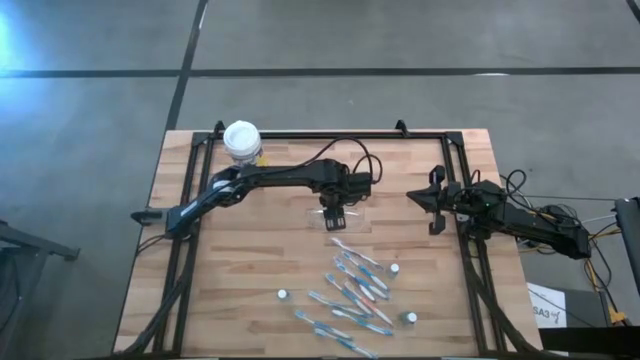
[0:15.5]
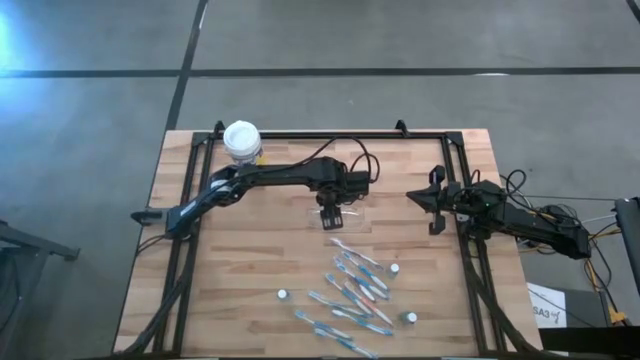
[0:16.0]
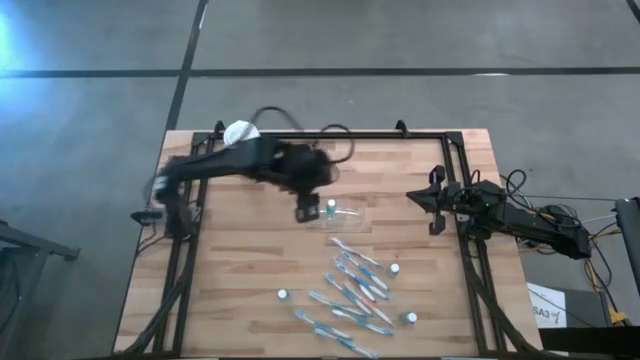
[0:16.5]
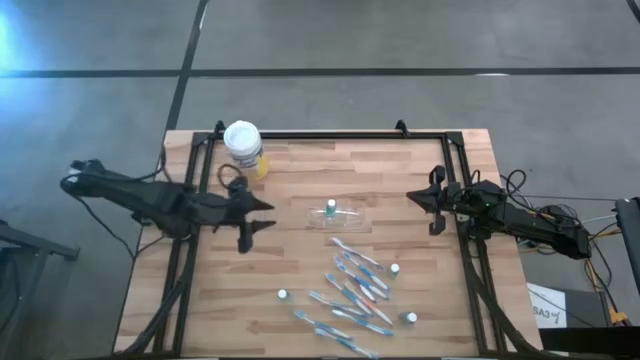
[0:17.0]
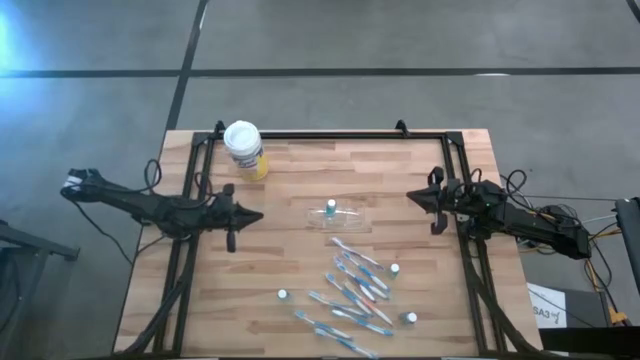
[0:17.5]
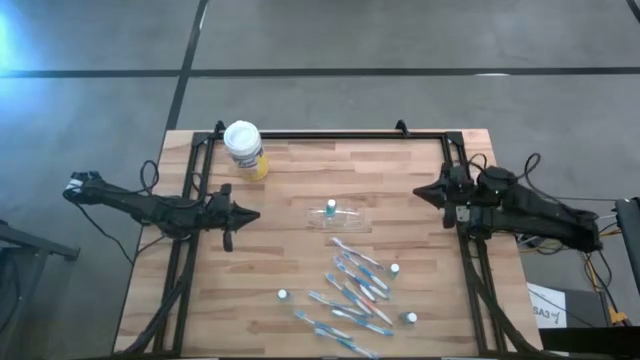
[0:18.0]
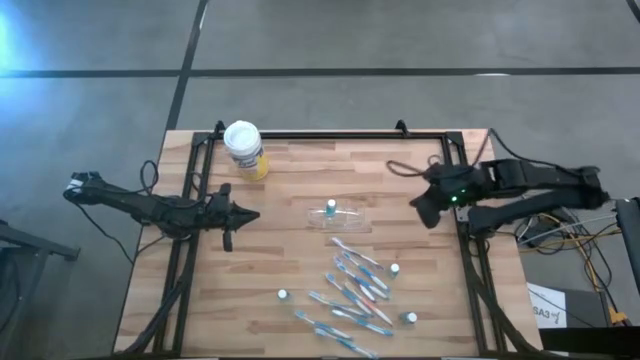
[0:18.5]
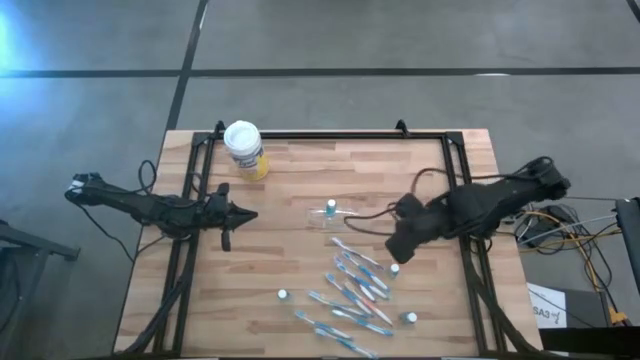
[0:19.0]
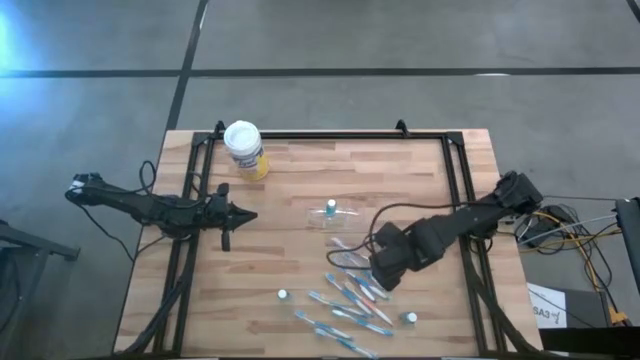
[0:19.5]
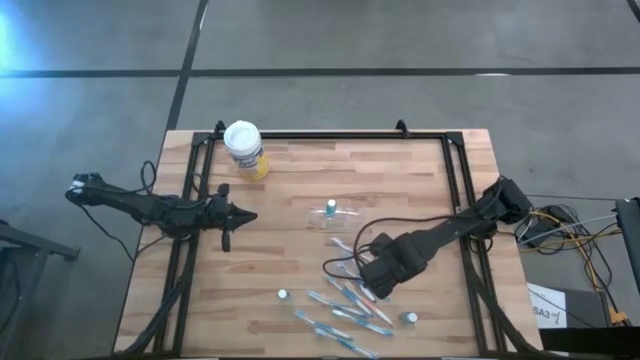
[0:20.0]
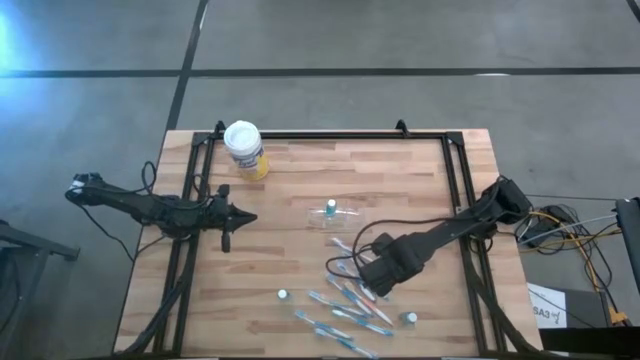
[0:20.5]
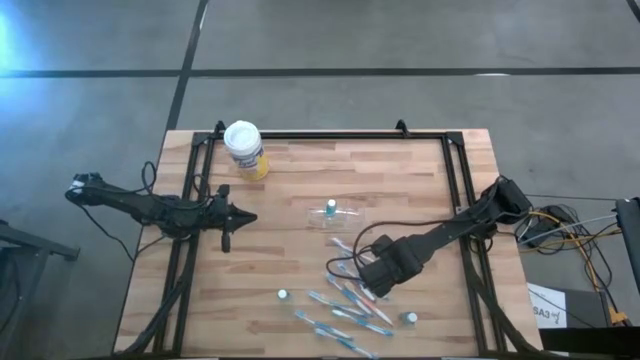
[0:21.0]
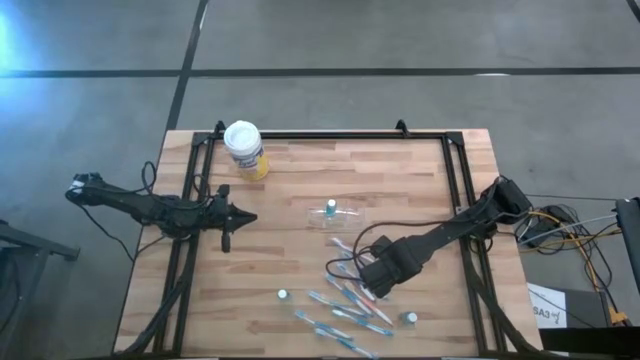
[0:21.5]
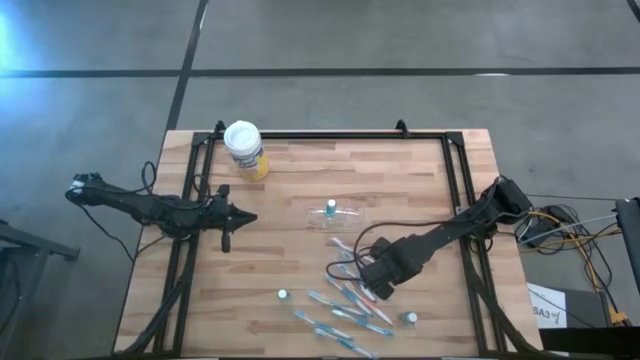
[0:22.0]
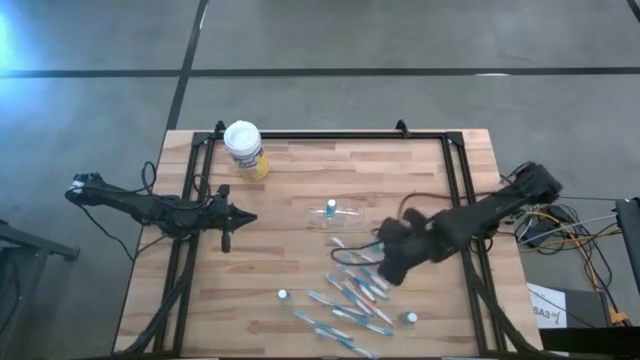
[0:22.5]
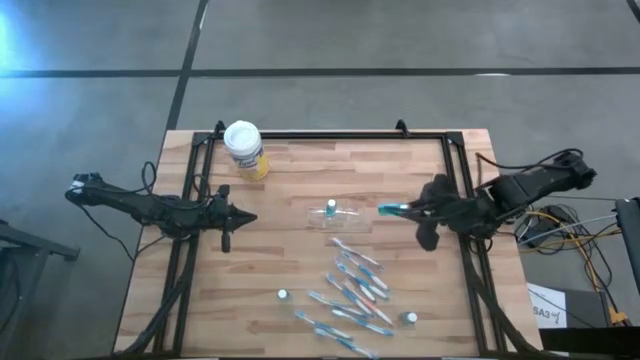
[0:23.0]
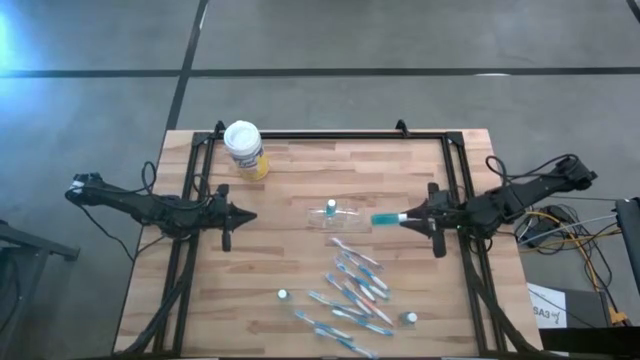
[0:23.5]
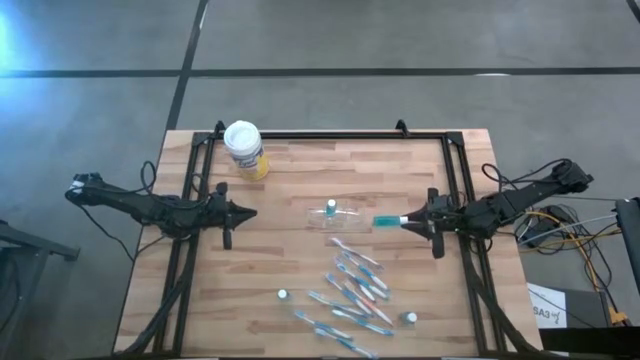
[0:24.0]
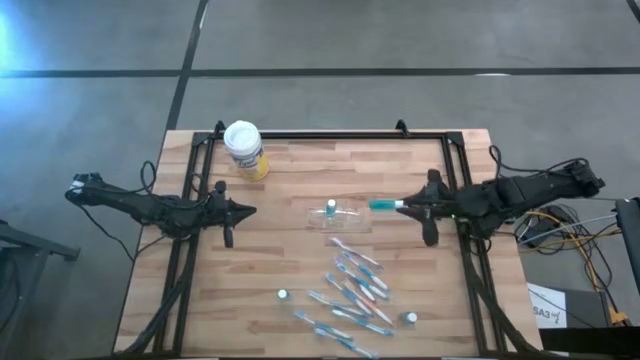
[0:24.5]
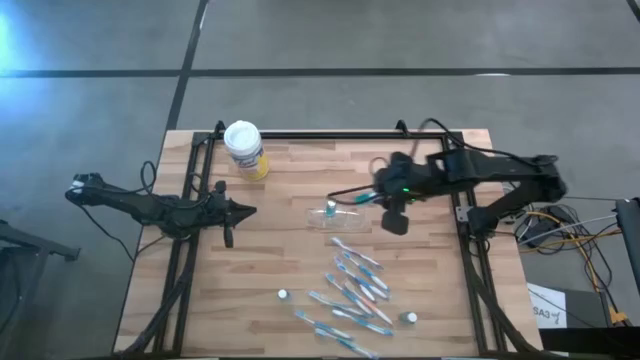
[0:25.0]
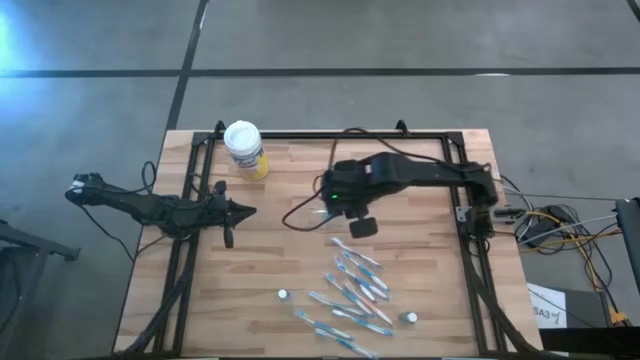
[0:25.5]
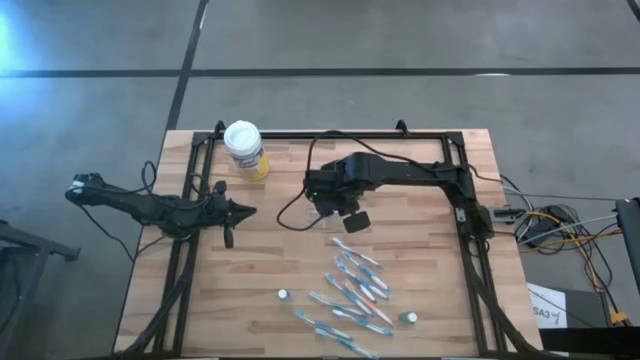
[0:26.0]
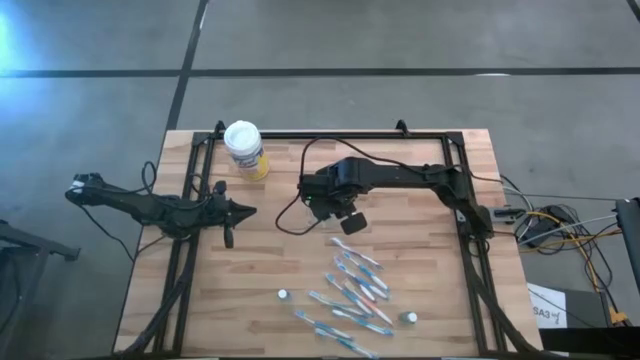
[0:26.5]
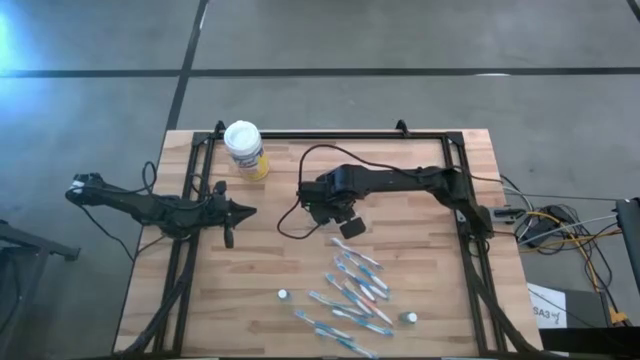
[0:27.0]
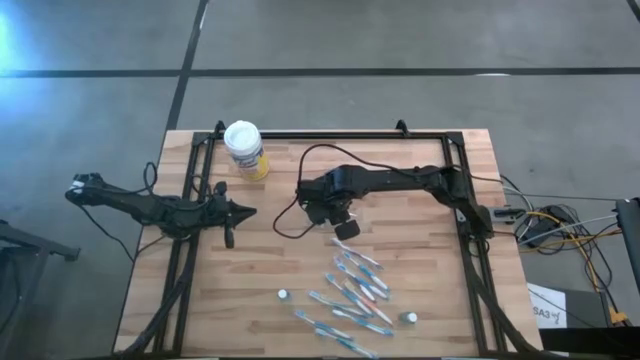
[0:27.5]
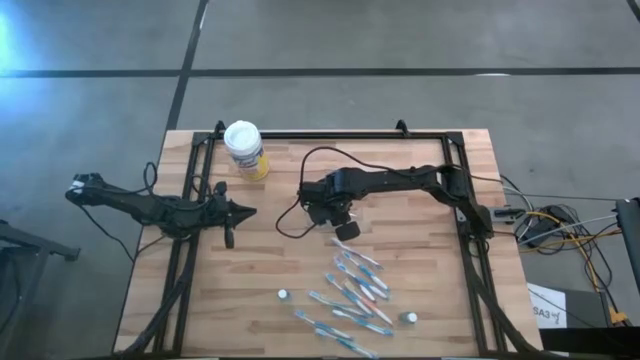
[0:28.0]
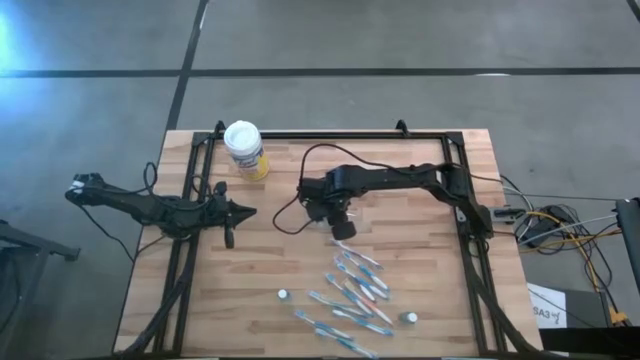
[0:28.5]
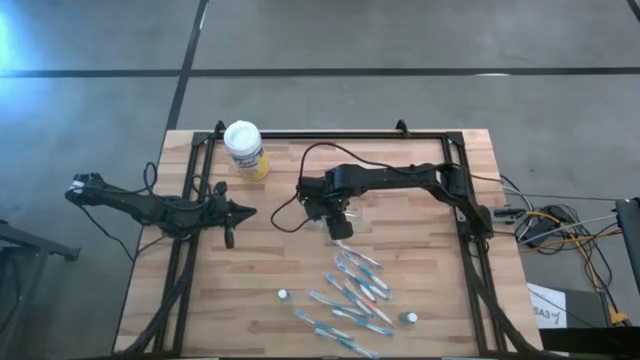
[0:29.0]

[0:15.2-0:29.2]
Task: Pick & Place toothbrushing station
Put the blue mouthwash bottle into the middle compartment of the transparent organizer

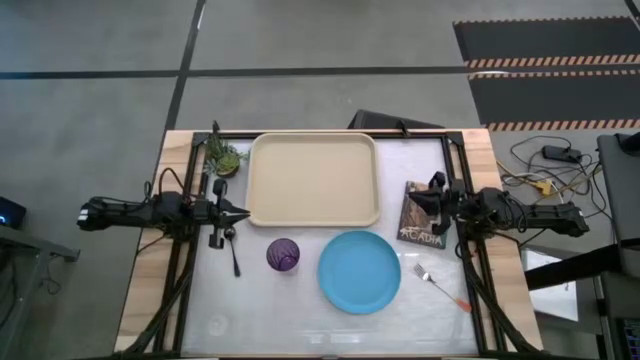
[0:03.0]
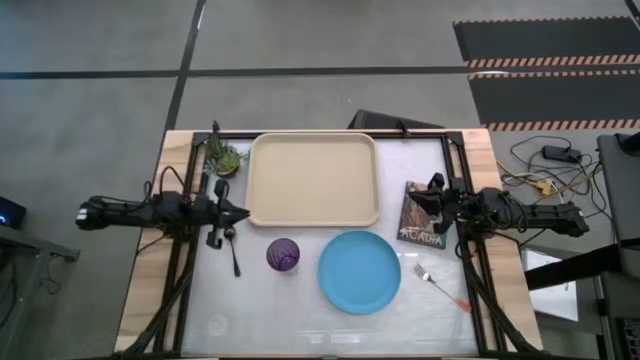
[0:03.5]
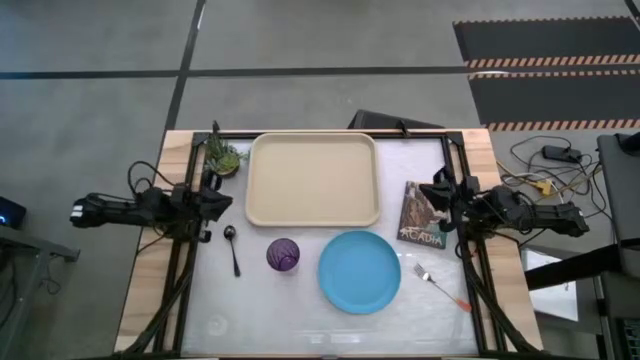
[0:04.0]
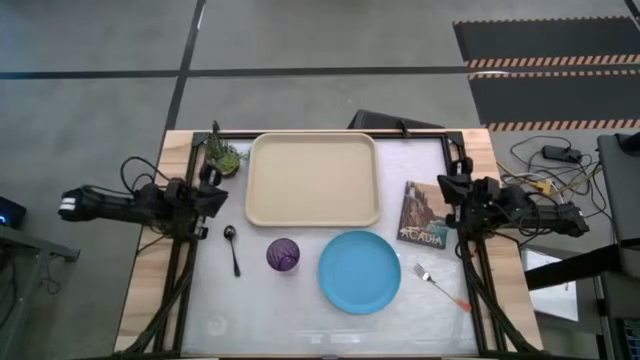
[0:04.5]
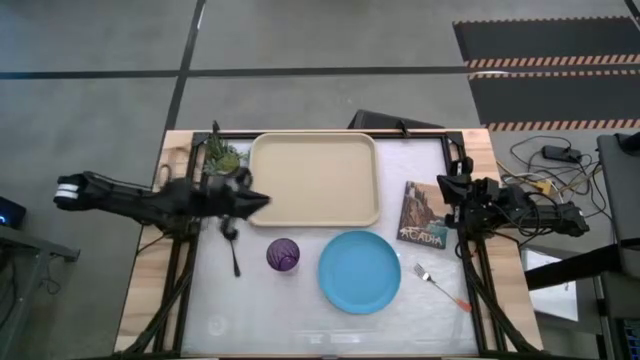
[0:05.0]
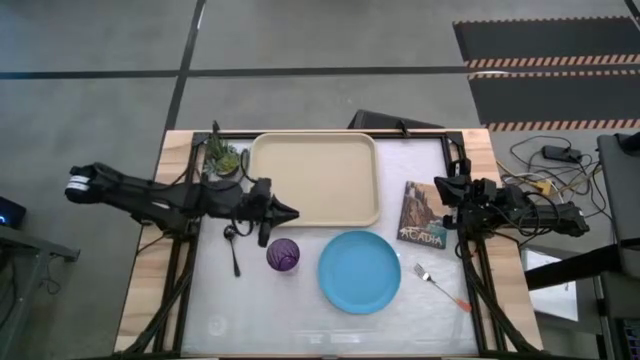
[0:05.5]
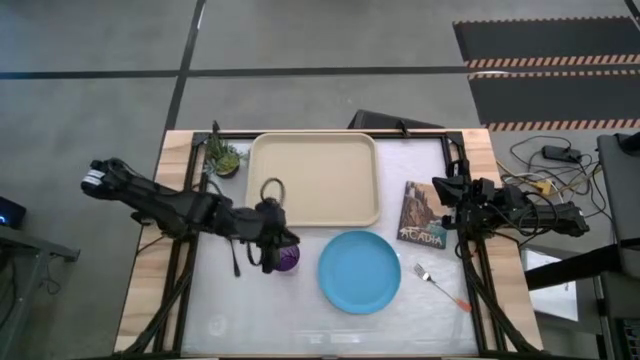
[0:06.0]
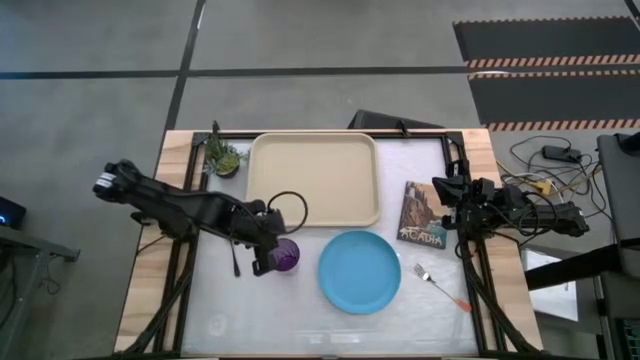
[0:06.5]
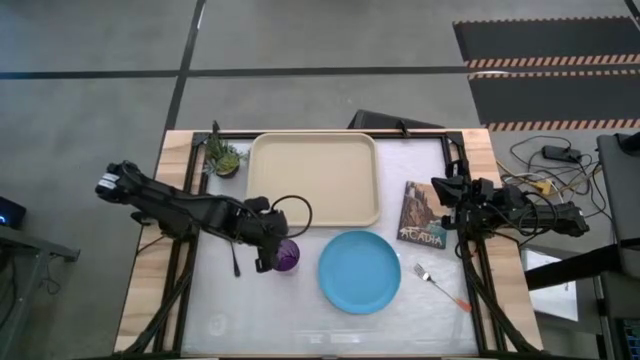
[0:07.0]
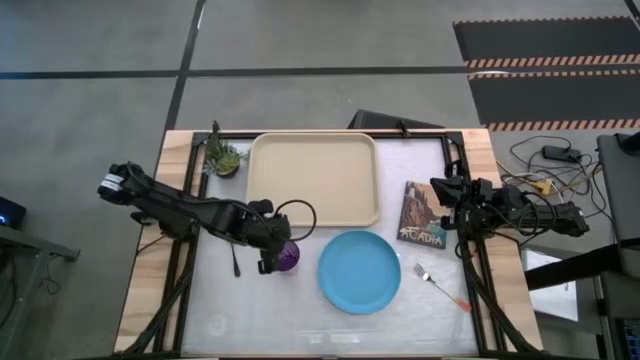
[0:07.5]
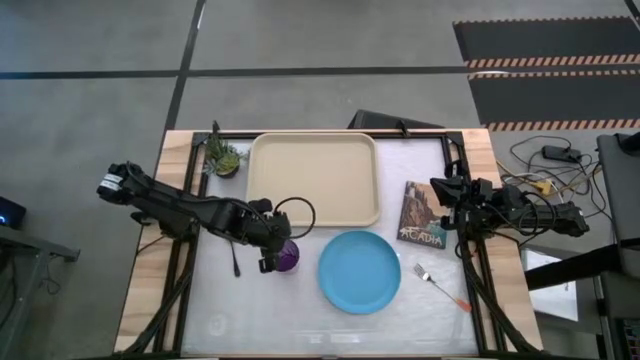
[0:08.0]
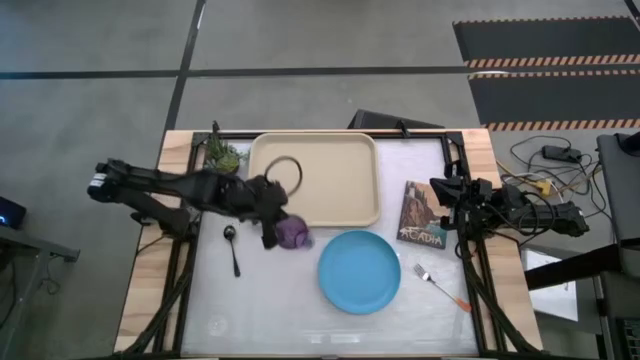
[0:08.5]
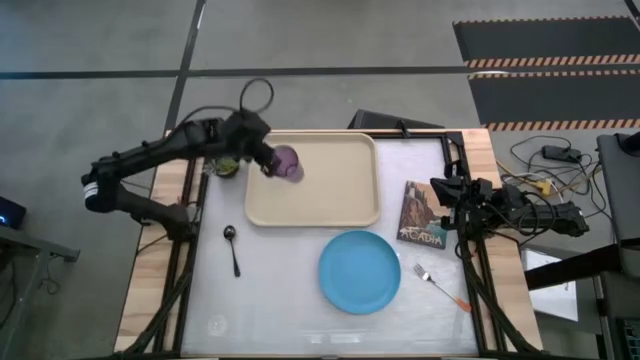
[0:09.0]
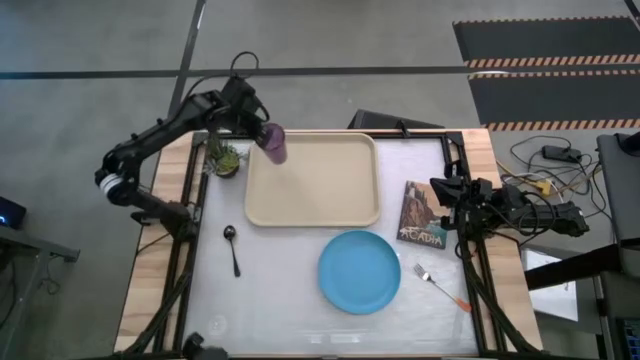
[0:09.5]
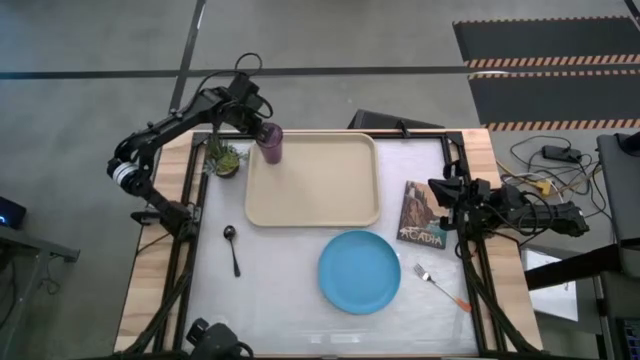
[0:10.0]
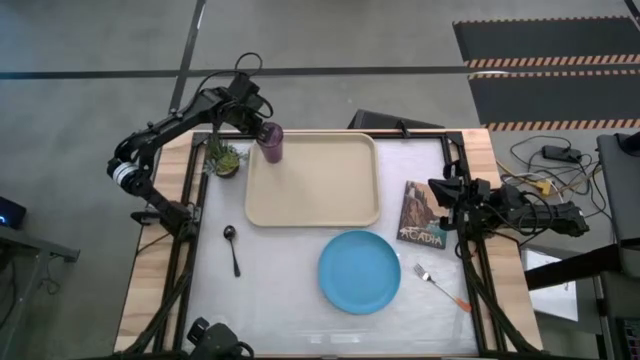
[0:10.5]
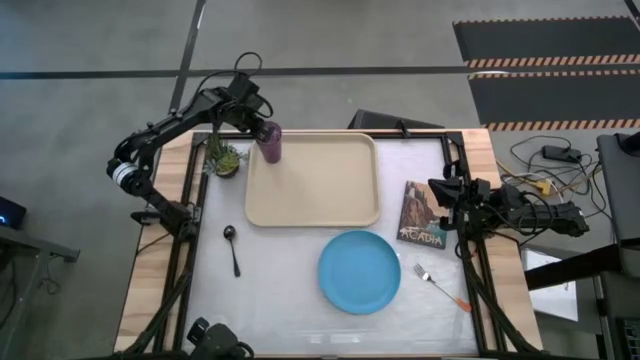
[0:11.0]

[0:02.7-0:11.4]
Task: Pick and place plate/cup/fork/spoon on tray
Put the violet cup on the brown tray
